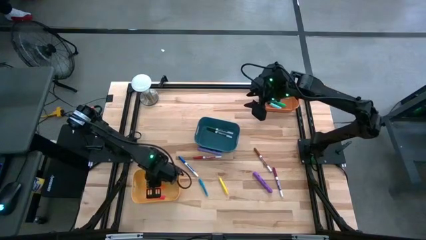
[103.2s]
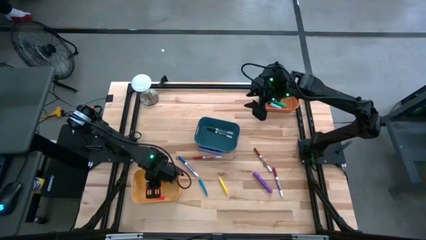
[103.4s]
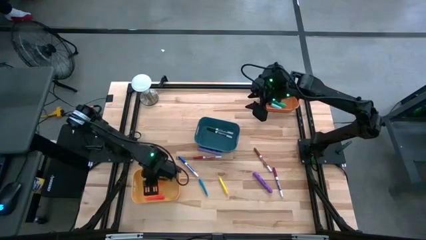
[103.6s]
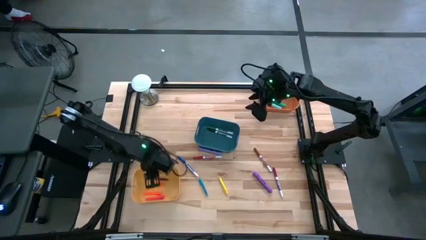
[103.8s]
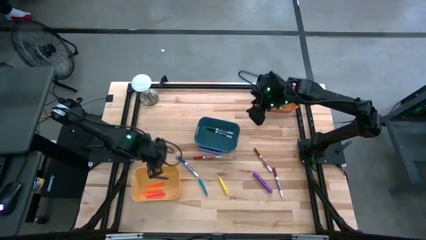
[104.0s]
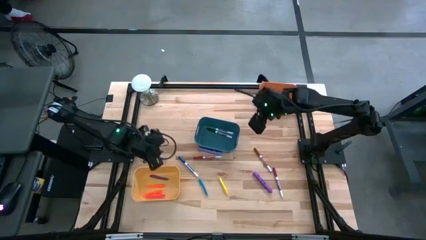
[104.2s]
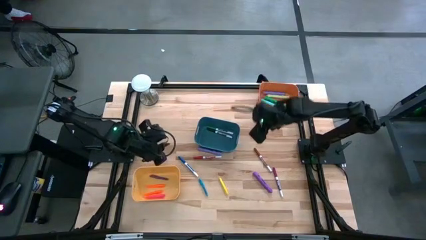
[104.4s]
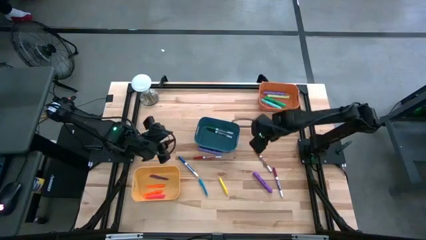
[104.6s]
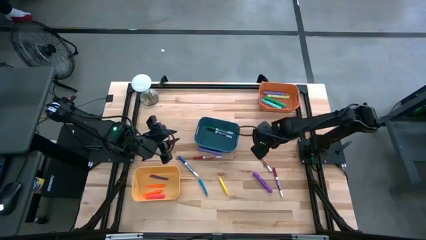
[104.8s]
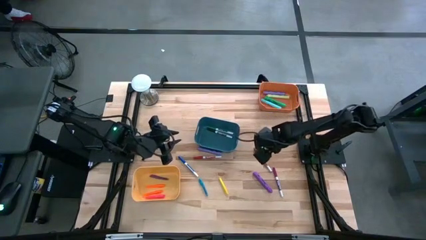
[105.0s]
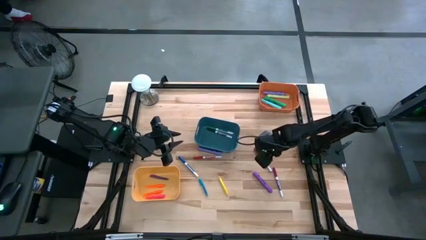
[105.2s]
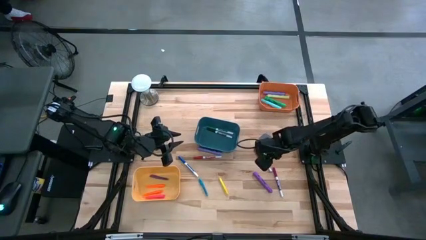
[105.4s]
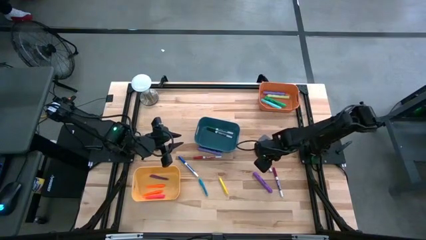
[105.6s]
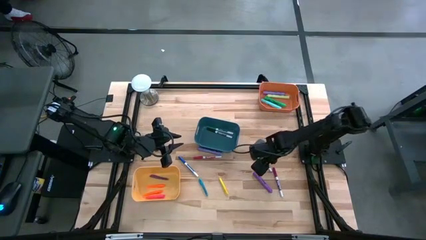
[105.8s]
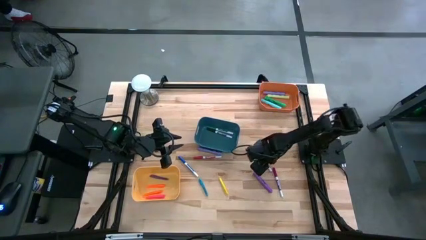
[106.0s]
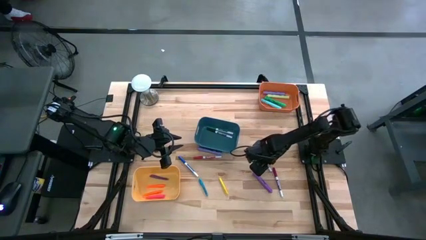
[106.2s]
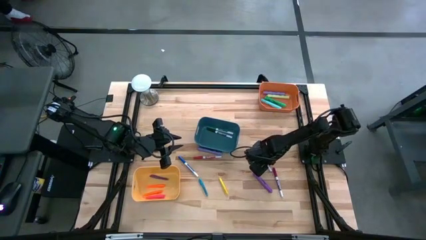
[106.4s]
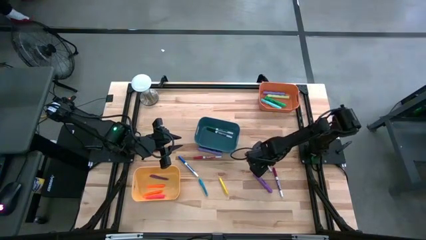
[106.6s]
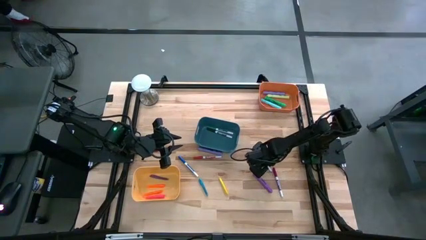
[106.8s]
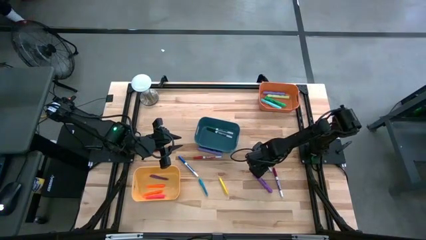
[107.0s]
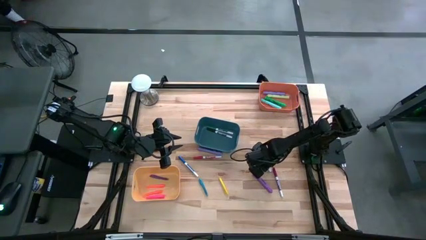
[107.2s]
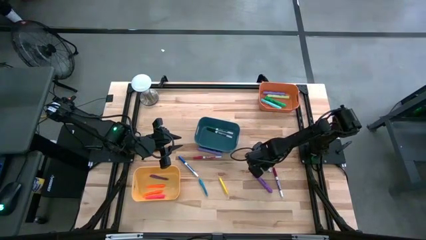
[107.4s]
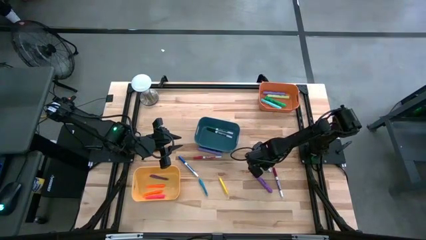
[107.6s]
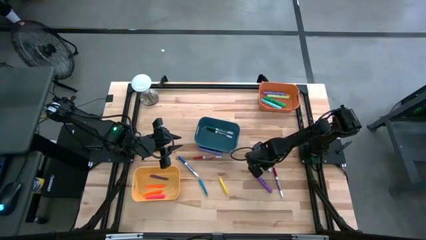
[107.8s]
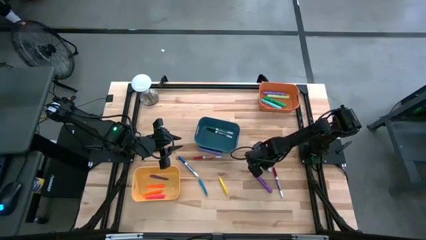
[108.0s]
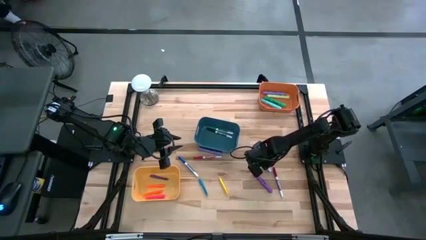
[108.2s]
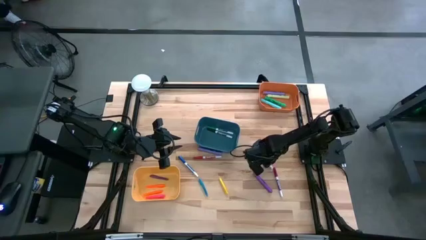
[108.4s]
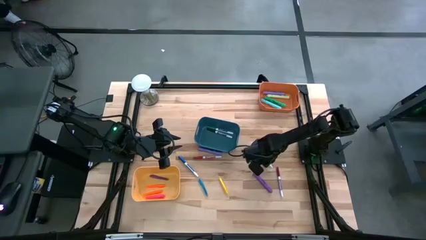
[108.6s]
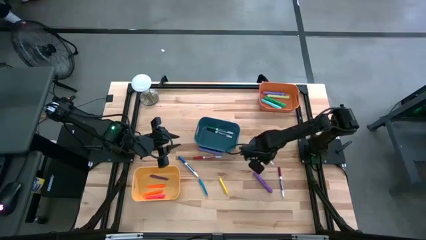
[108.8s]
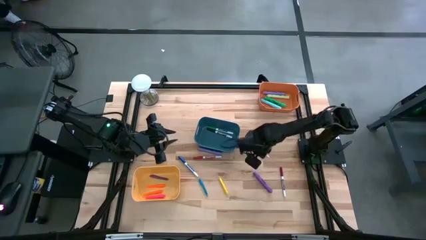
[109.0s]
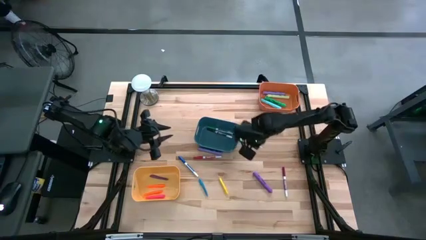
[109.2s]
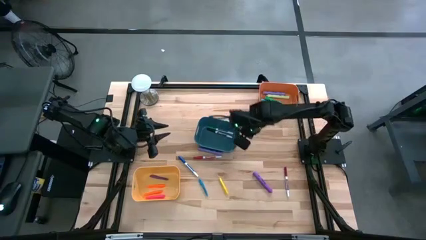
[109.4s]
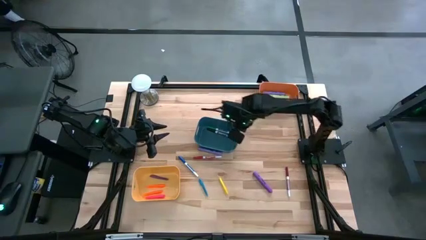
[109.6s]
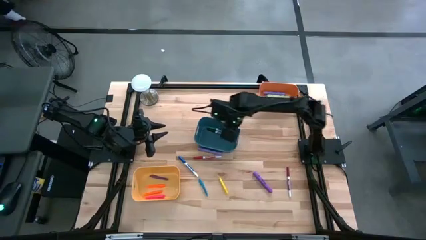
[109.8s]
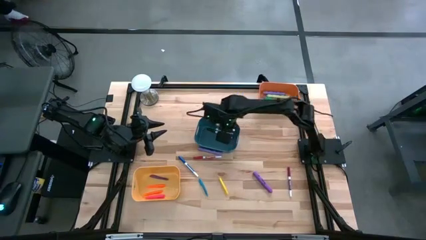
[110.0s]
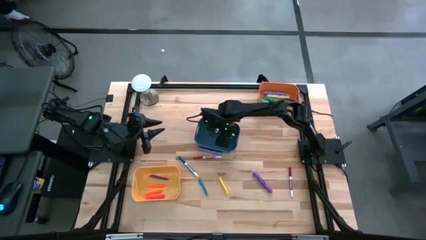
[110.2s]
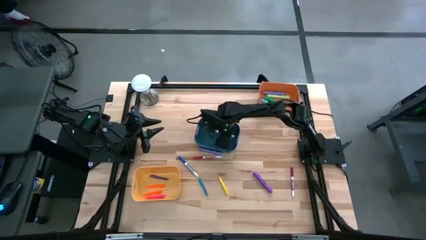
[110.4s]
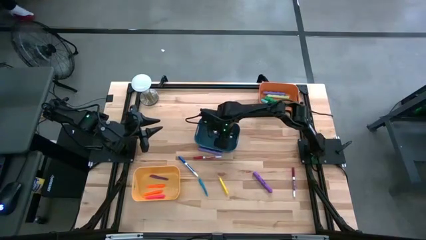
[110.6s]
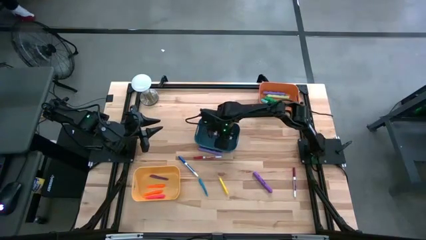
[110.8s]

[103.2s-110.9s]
Task: Pick & Place Markers
Put the brown marker pen into the blue bin

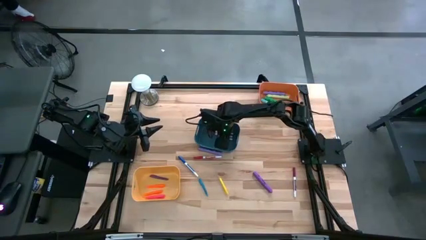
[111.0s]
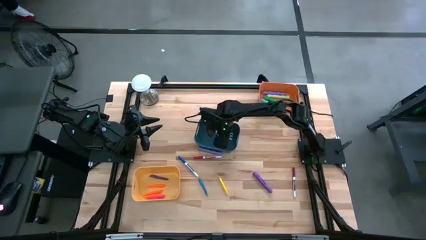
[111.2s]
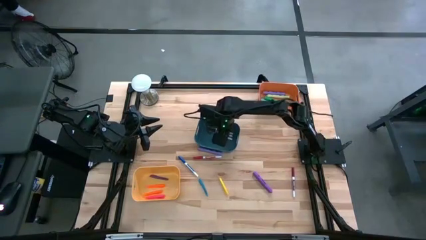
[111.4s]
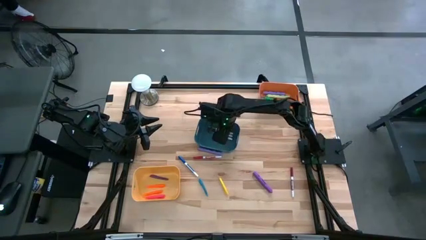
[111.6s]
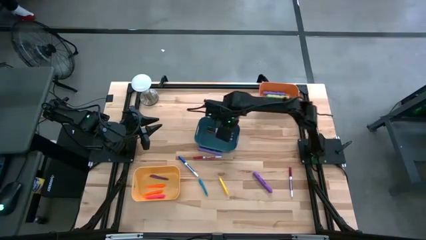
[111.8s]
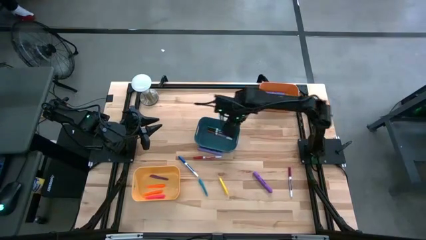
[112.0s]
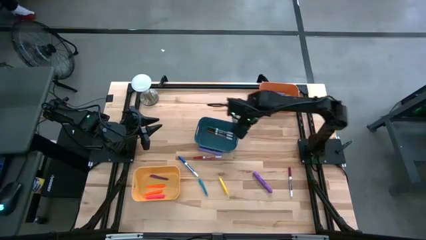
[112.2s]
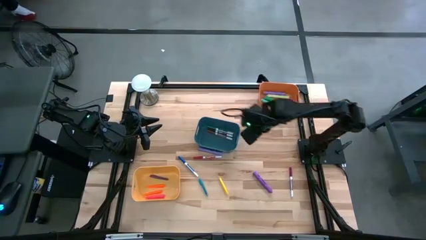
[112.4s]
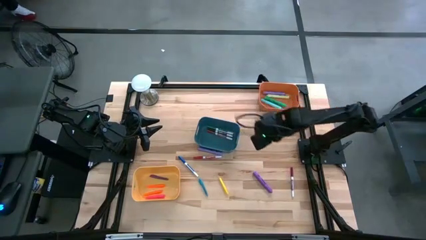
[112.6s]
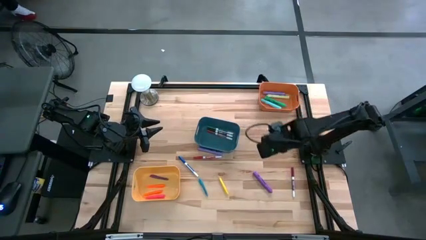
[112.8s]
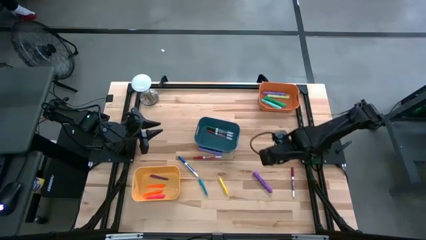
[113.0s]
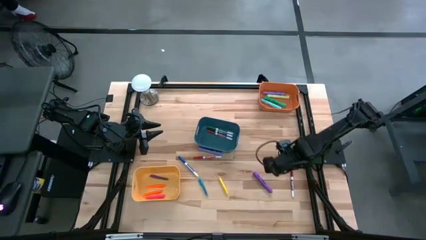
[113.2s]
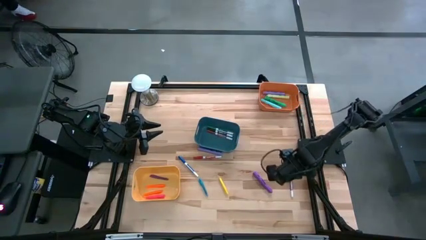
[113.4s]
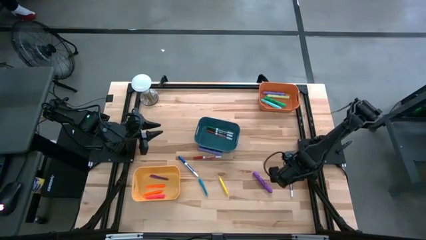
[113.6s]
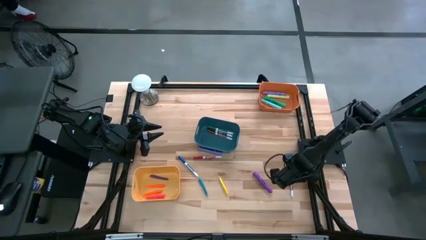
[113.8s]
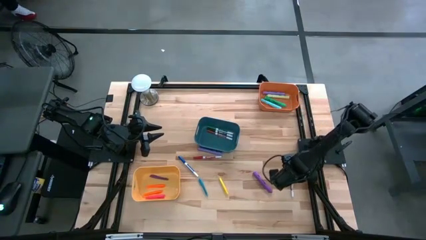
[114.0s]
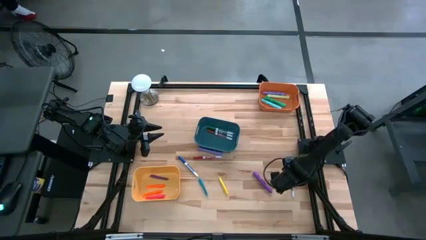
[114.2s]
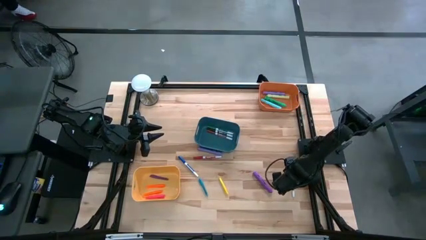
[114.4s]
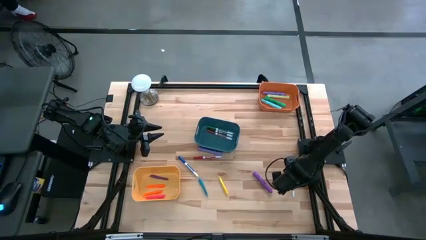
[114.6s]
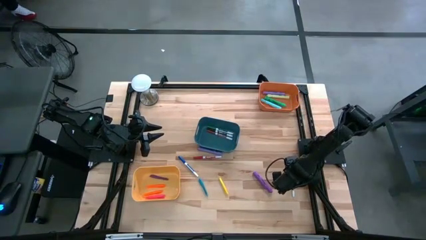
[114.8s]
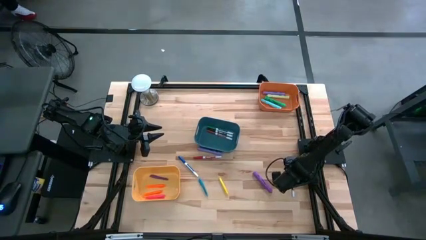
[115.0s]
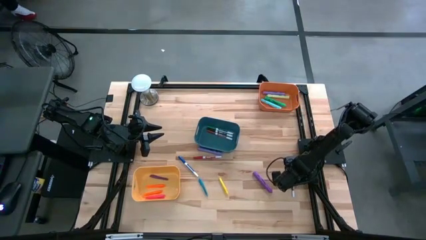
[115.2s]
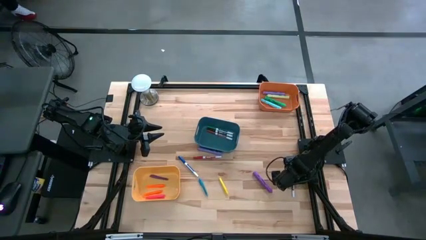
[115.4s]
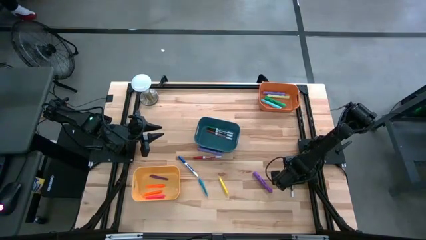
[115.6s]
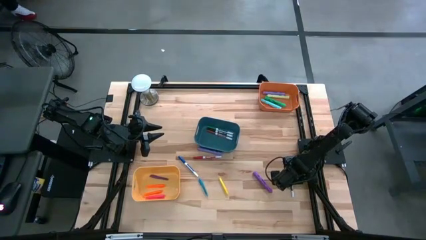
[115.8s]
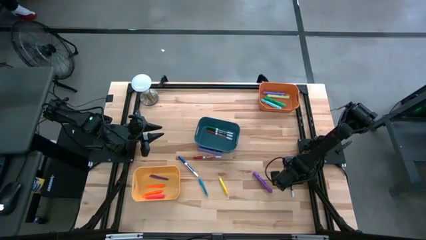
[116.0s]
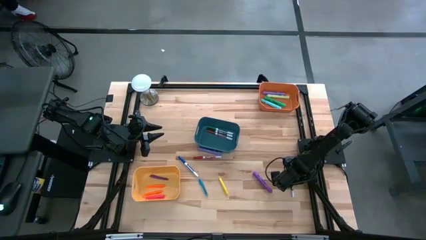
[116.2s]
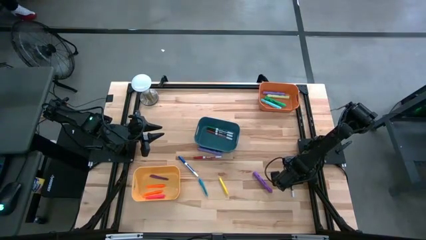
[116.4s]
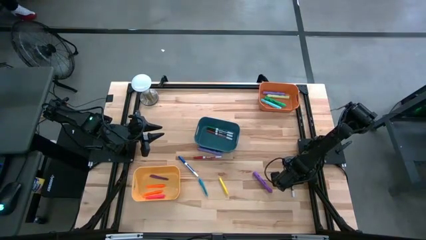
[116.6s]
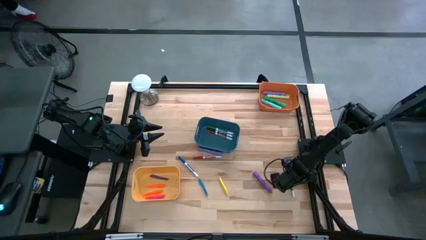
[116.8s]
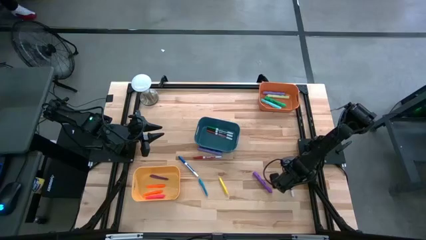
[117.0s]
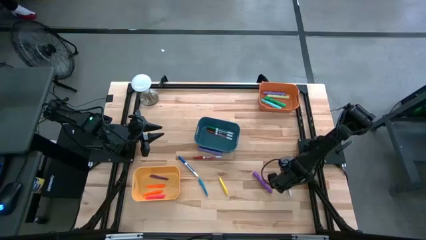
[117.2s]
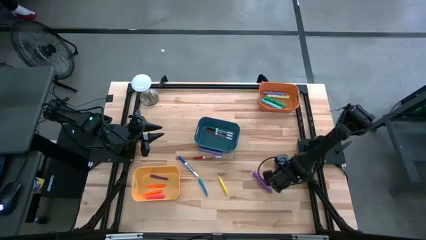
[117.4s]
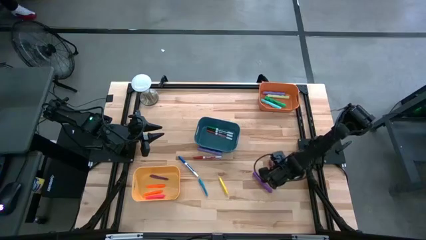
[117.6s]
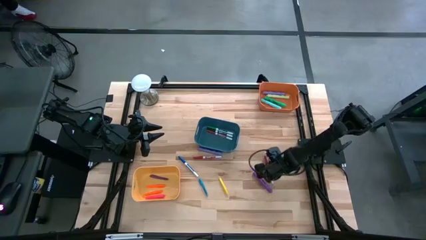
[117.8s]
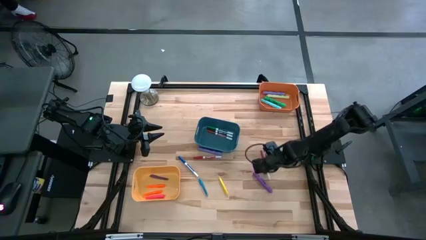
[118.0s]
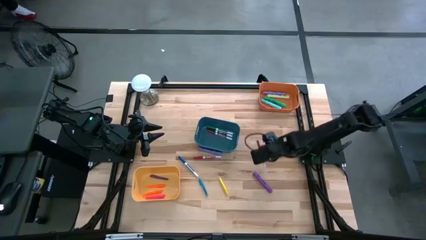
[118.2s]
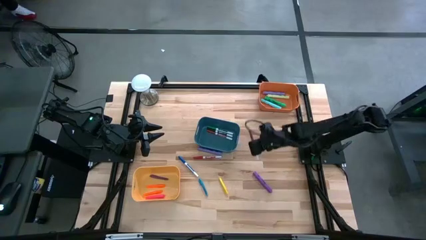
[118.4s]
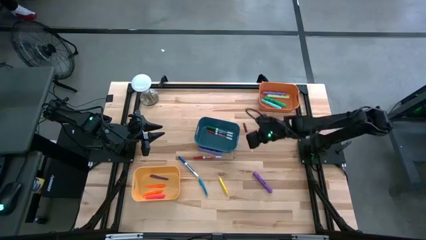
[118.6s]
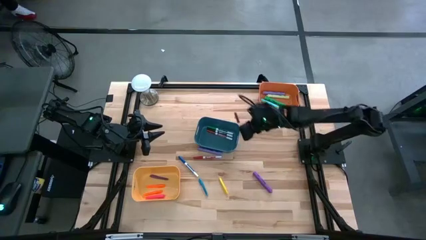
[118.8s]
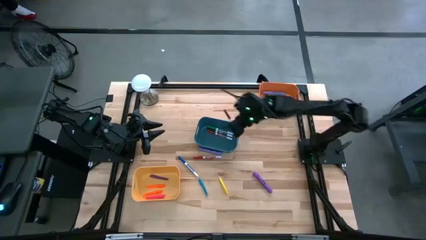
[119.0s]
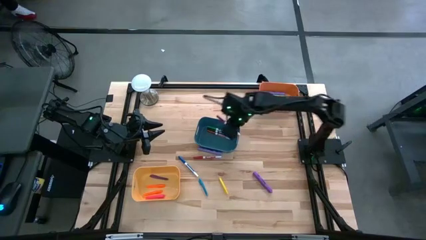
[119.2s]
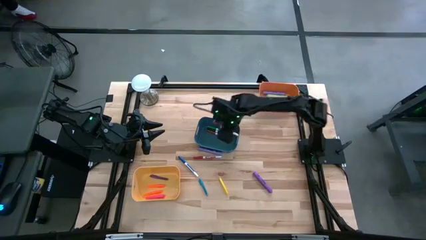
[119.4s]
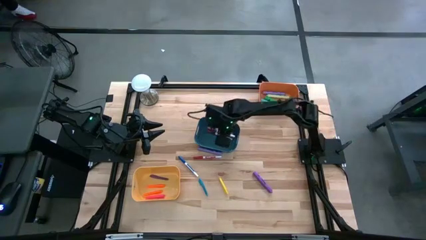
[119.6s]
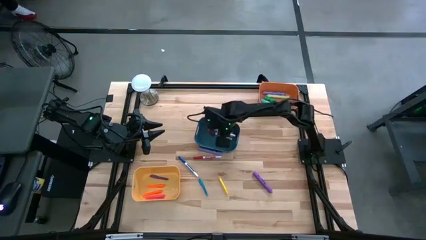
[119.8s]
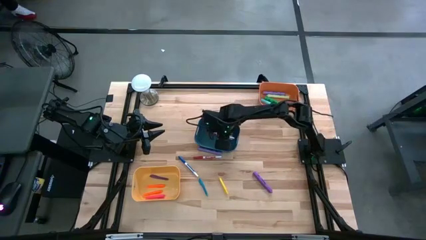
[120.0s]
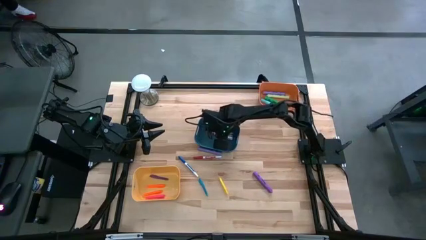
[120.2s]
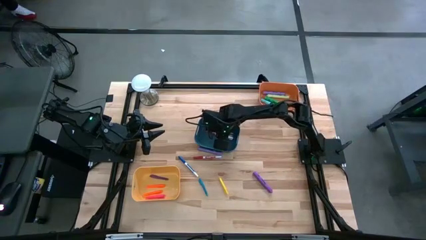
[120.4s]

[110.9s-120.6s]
Put the dark pink marker pen into the blue bin
